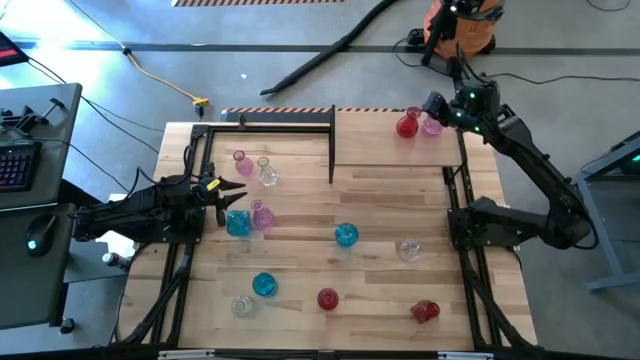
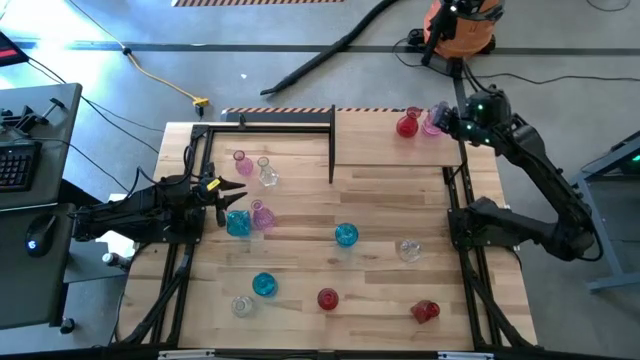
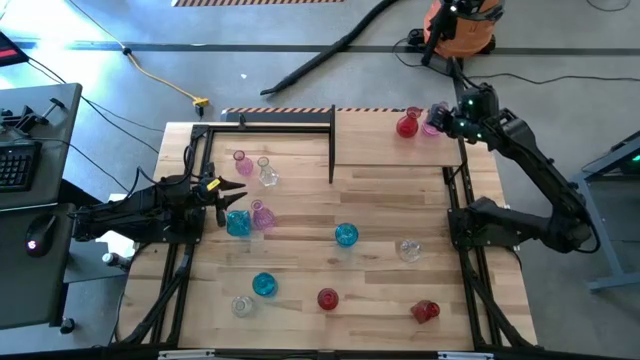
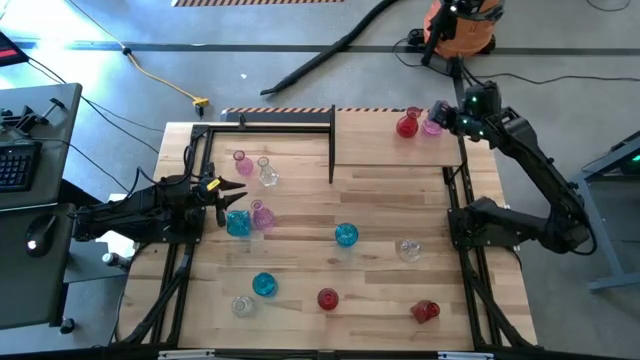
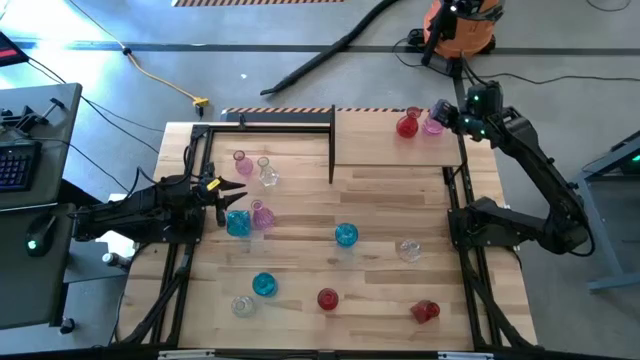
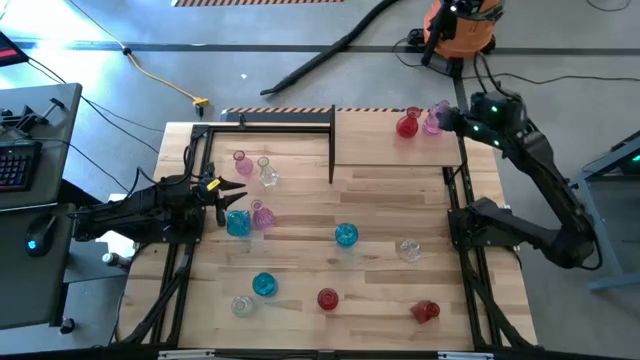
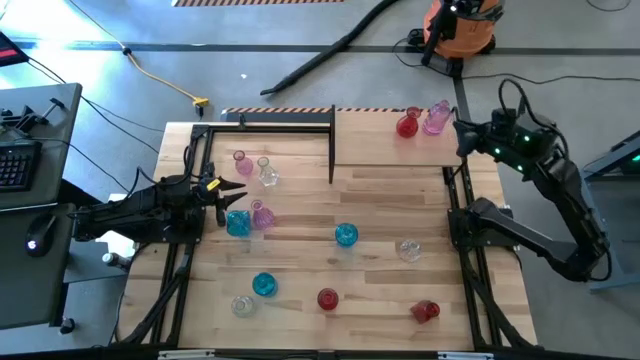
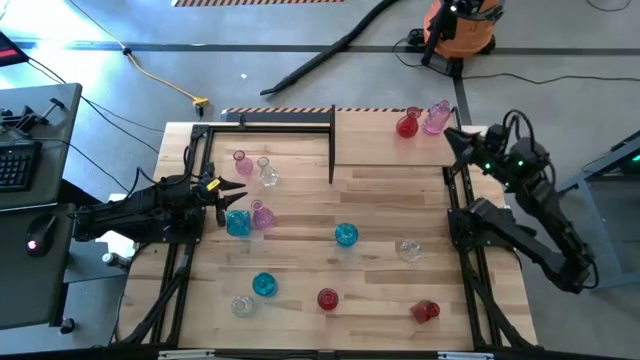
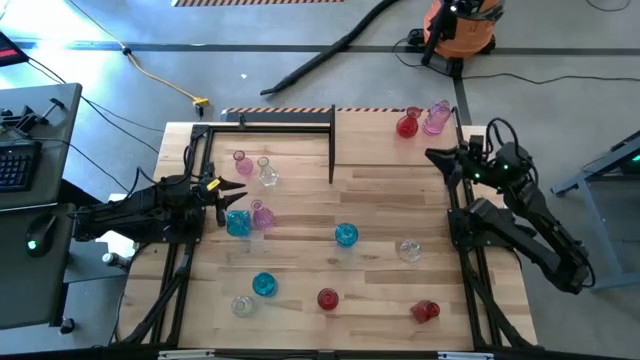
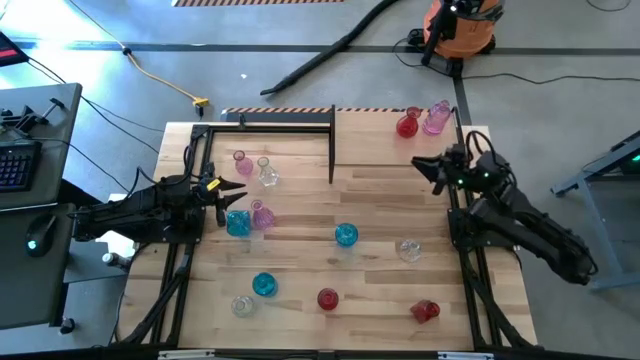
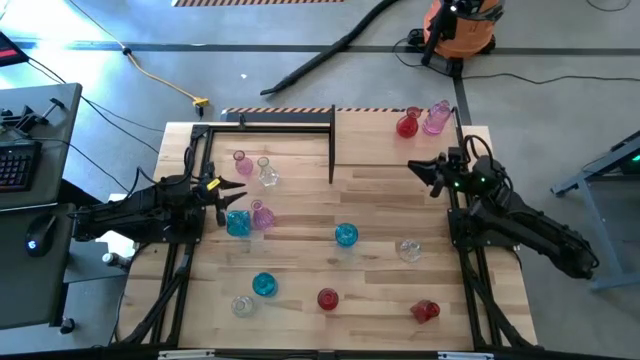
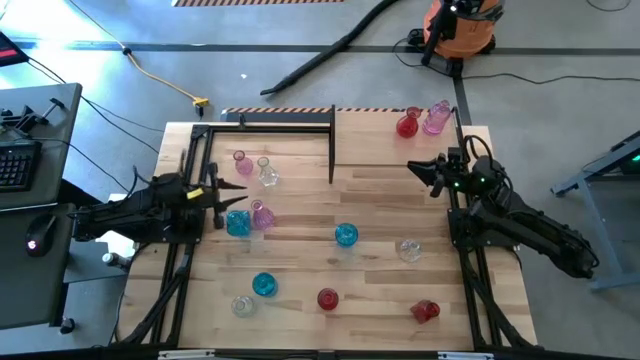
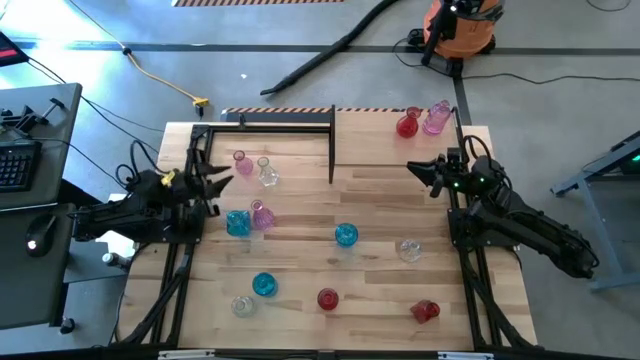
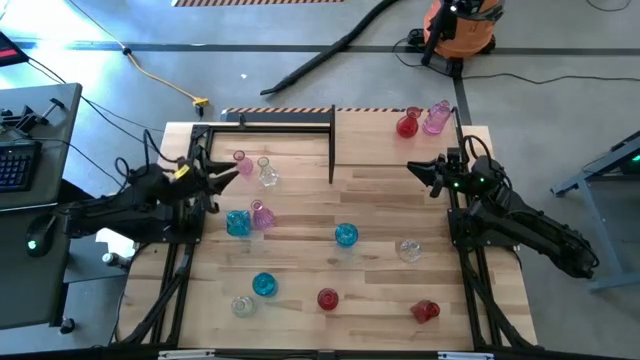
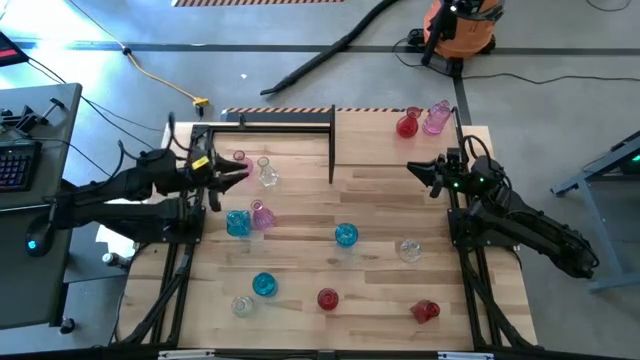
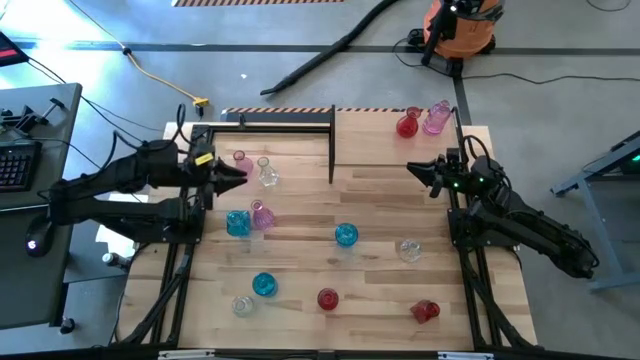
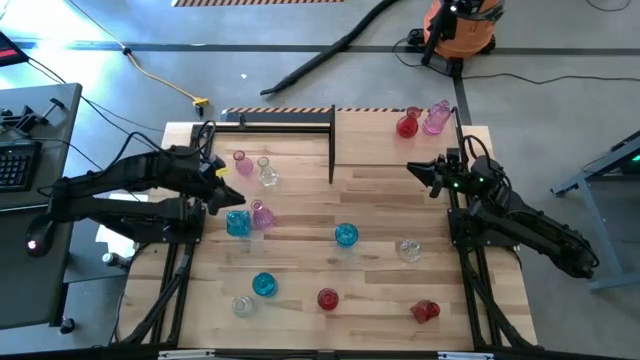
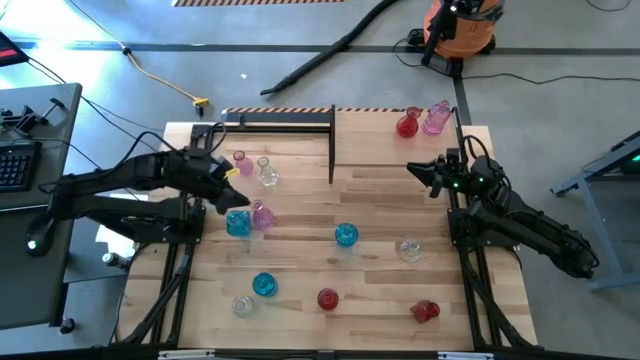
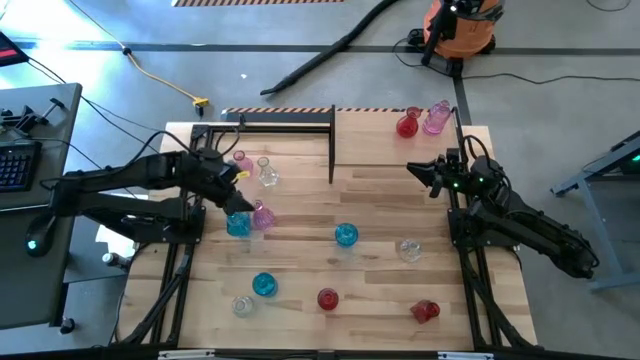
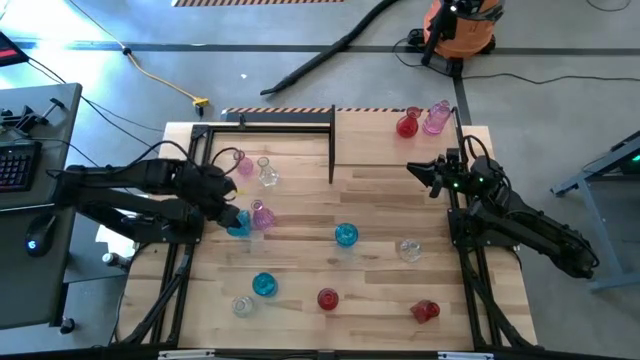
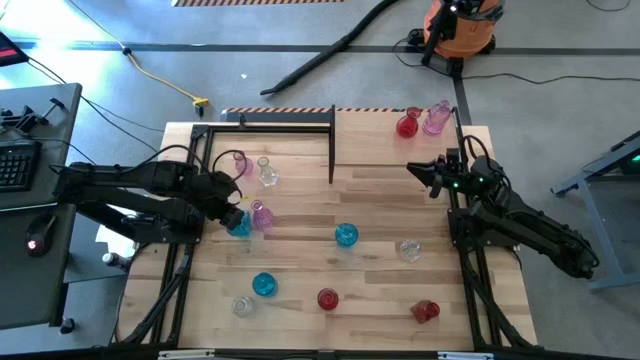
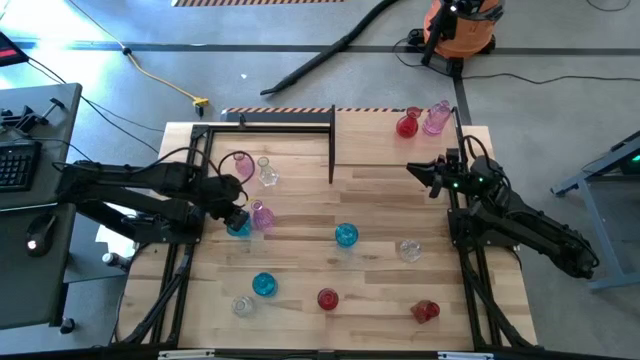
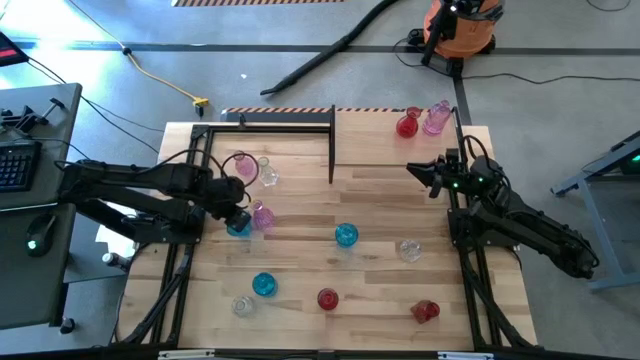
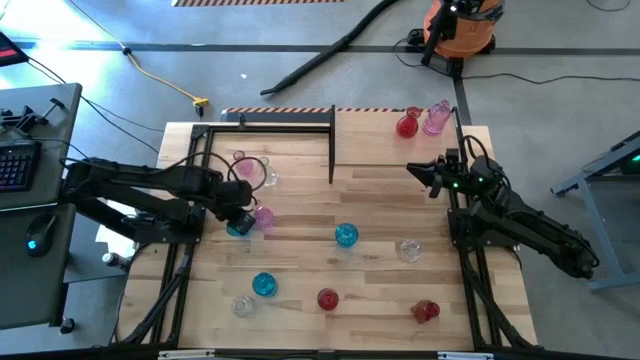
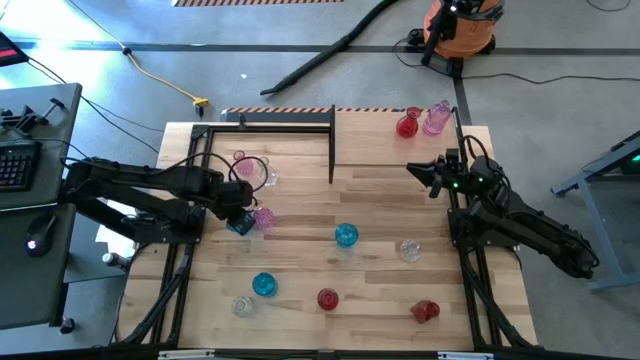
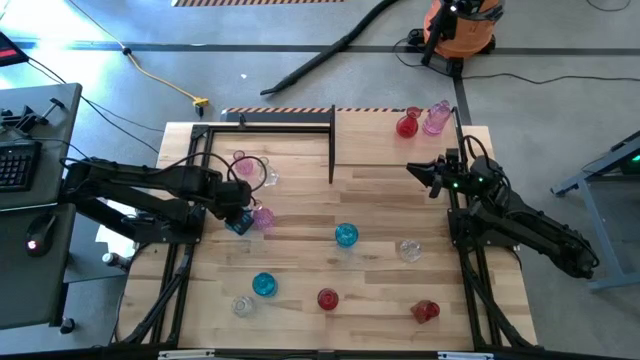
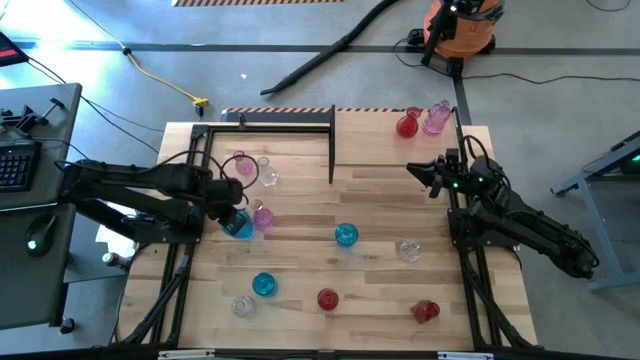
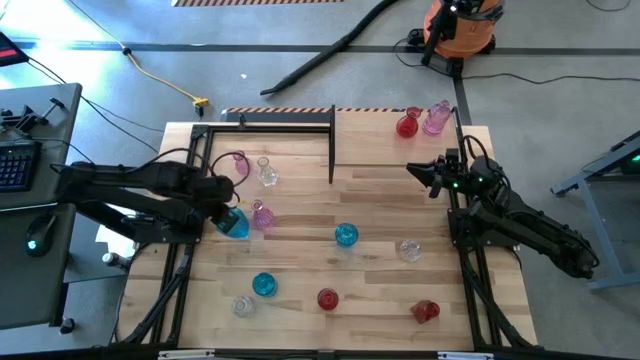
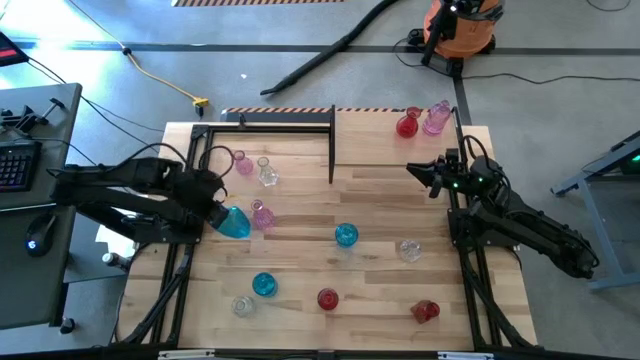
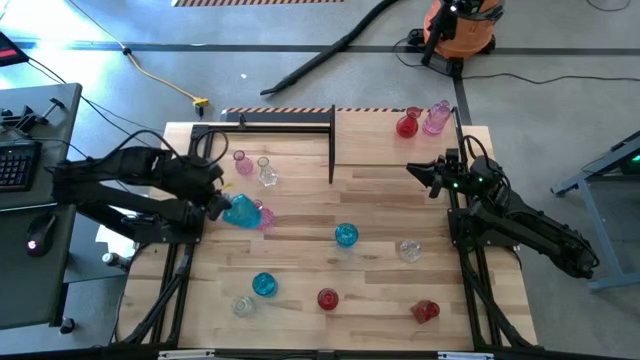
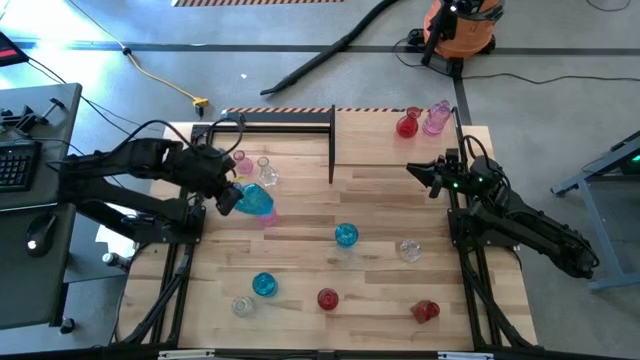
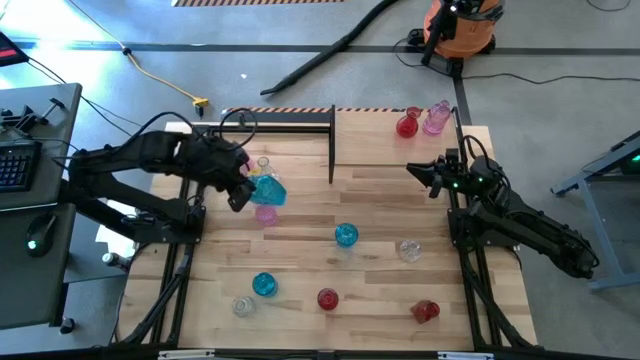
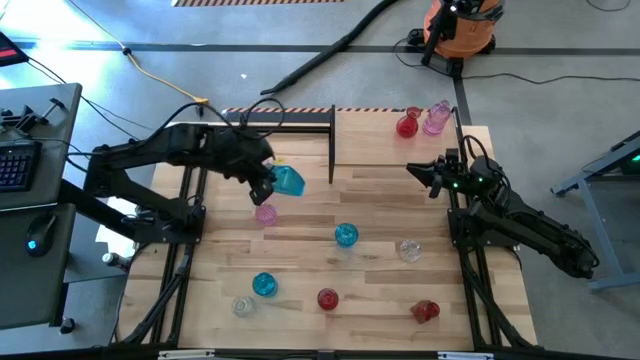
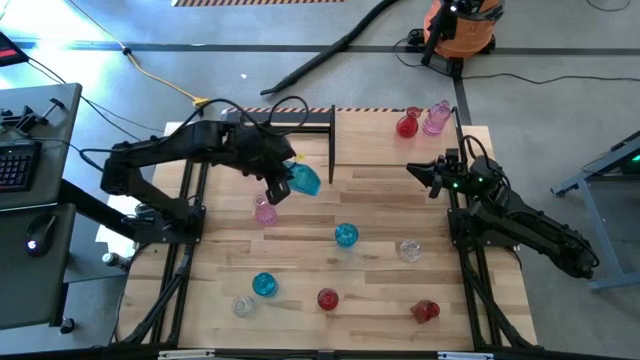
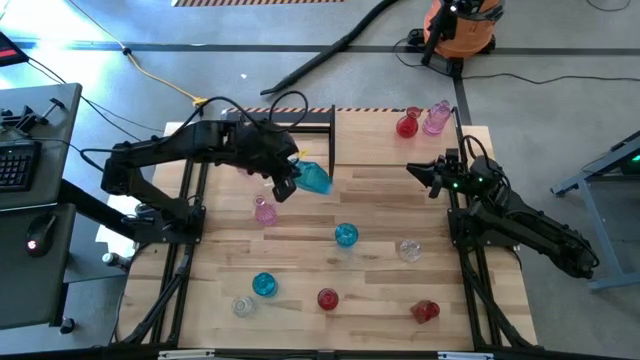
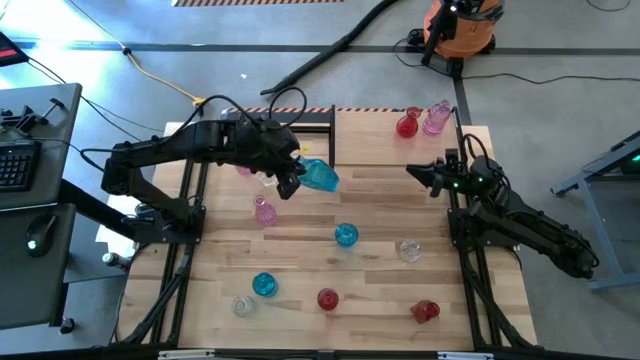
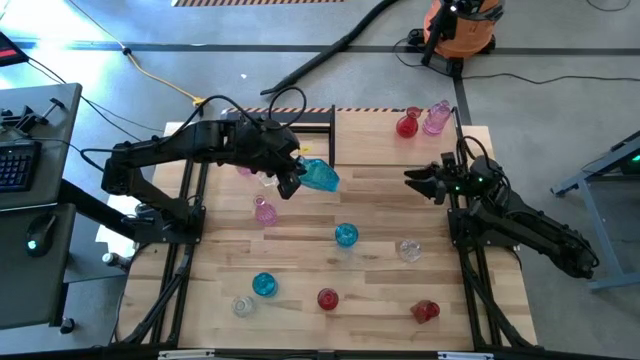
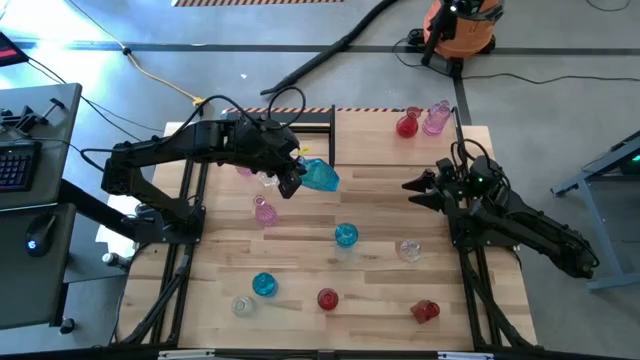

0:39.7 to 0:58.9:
Task: sort vases onto shelf
Put the top left blue vase on the shelf

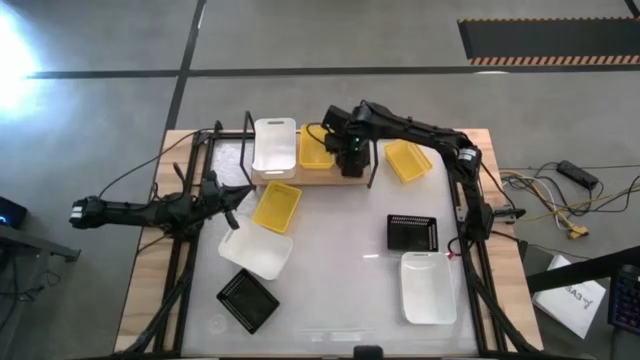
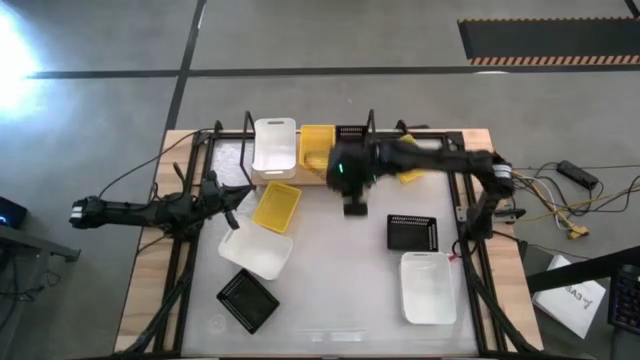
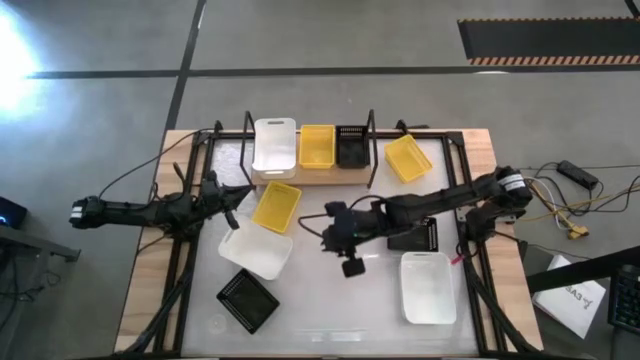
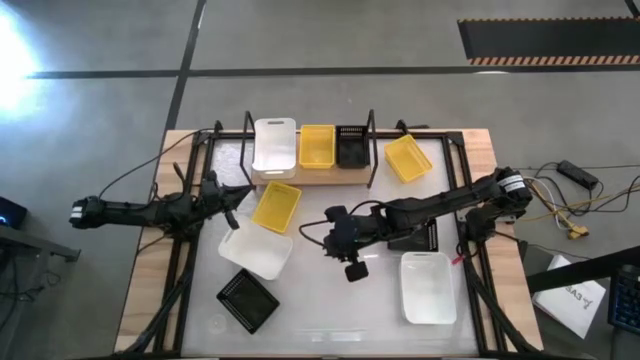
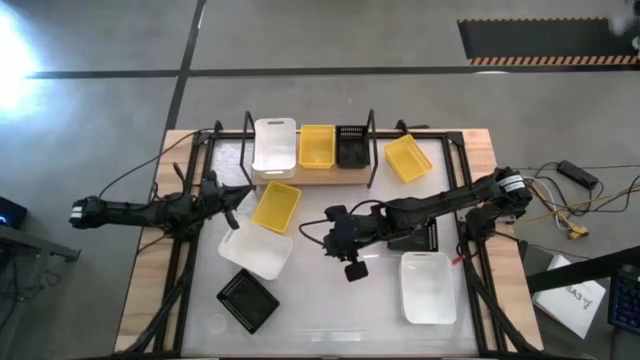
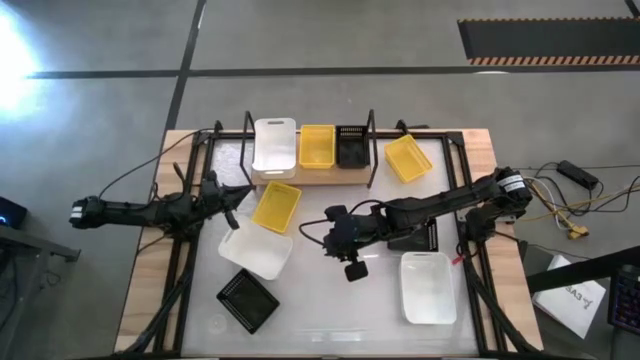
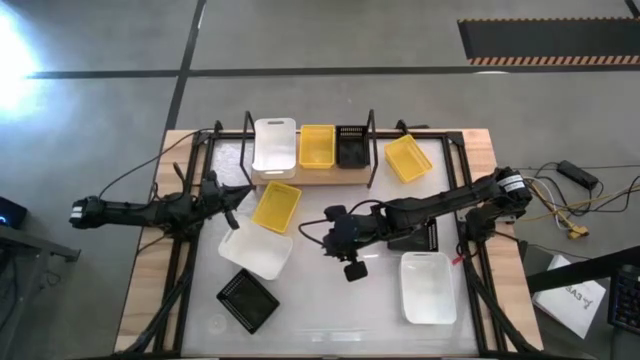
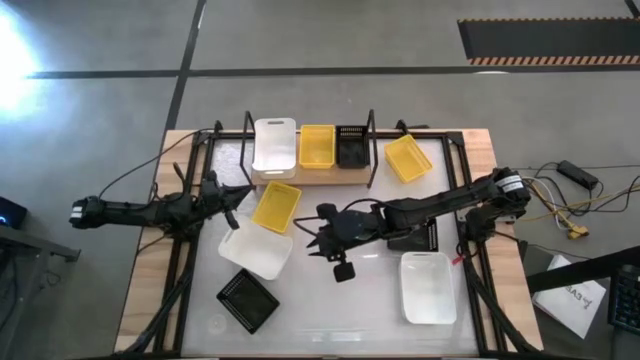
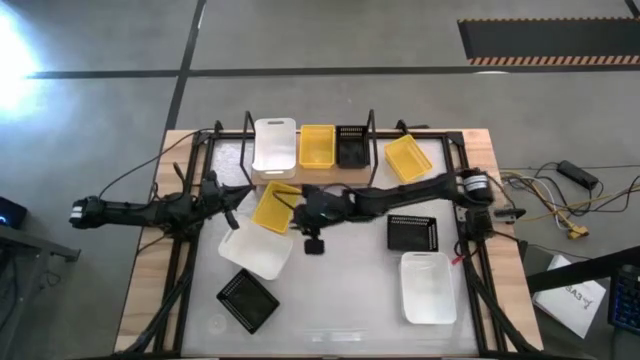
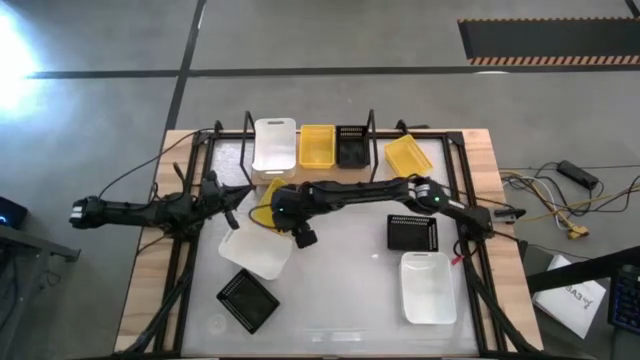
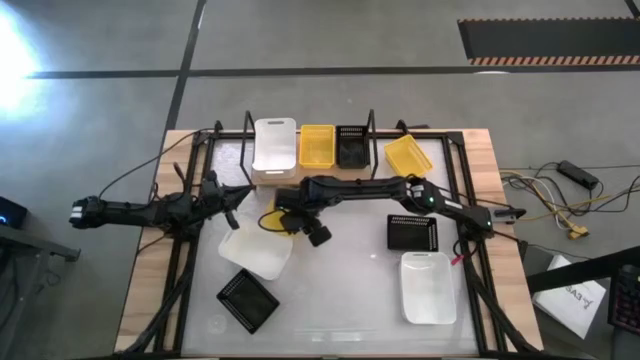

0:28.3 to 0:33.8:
Task: Stack baskets on shelf by color
Stack the bottom yellow bin on top of the yellow bin on the shelf
